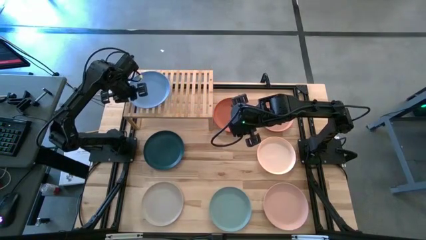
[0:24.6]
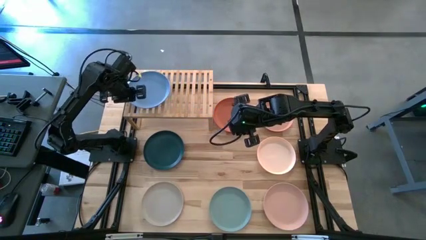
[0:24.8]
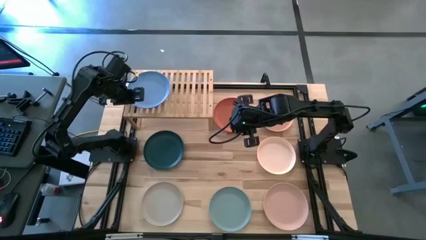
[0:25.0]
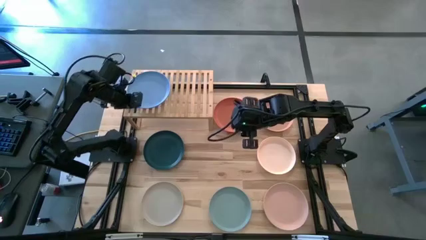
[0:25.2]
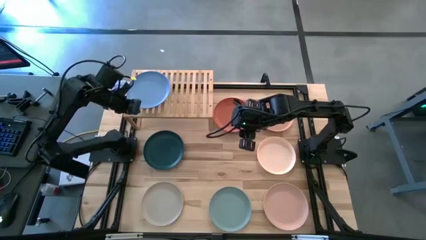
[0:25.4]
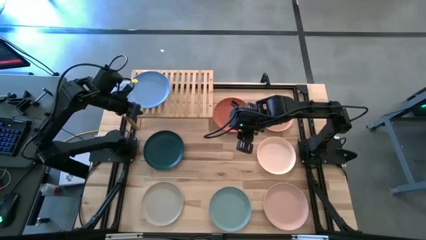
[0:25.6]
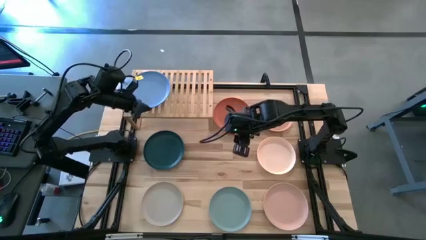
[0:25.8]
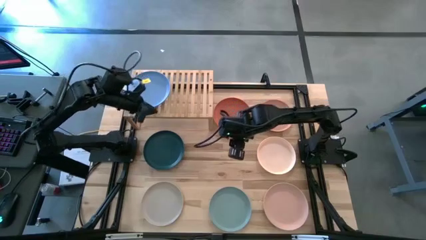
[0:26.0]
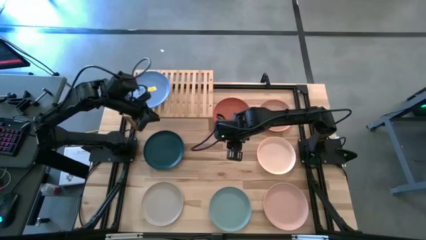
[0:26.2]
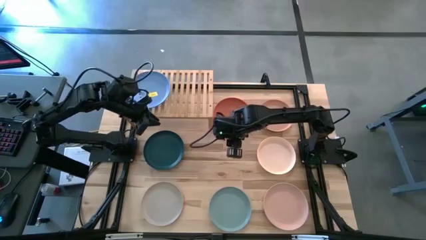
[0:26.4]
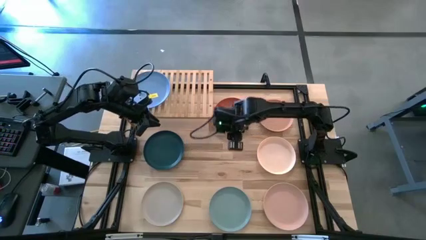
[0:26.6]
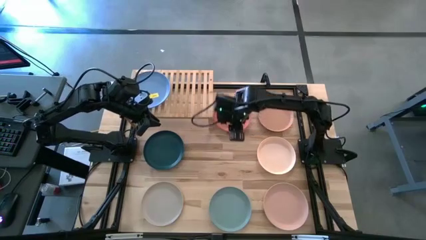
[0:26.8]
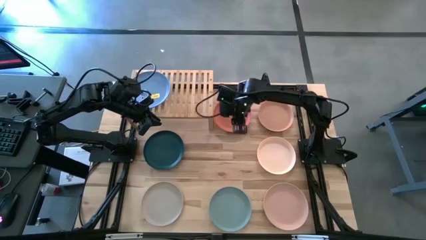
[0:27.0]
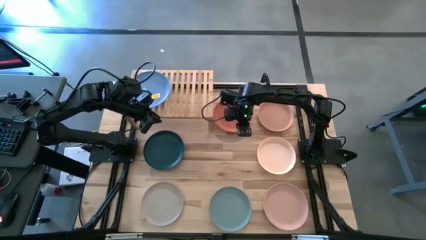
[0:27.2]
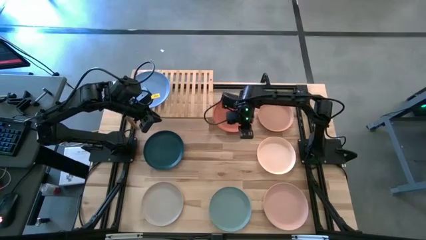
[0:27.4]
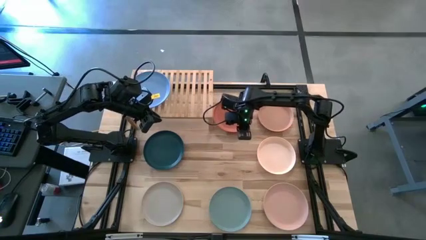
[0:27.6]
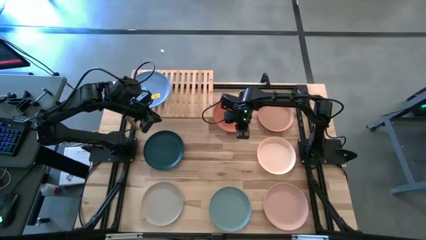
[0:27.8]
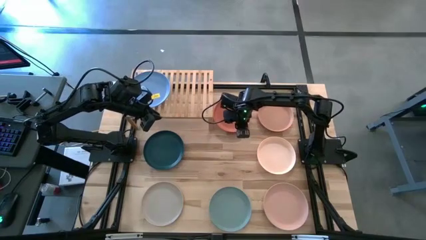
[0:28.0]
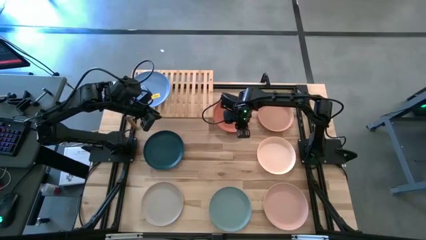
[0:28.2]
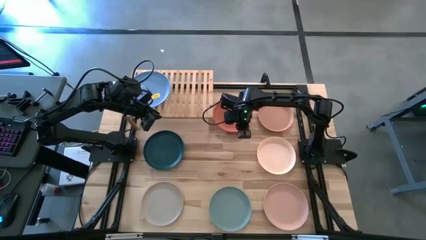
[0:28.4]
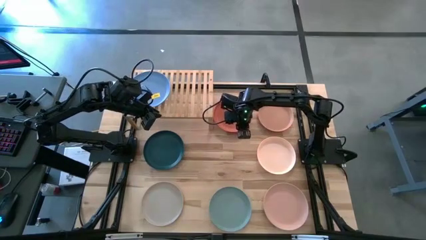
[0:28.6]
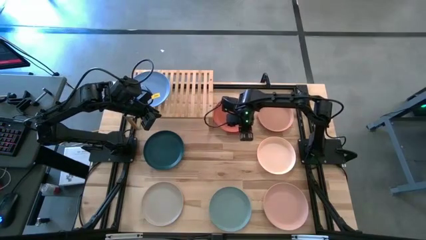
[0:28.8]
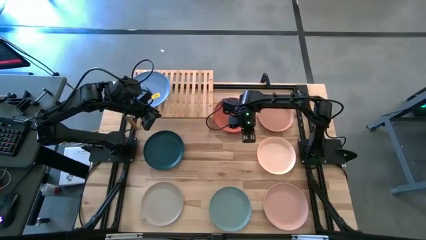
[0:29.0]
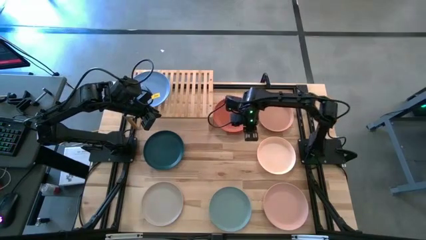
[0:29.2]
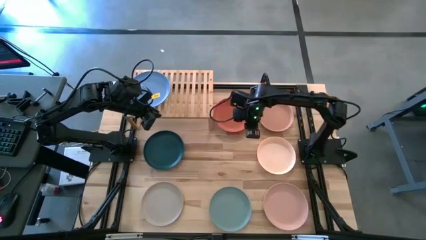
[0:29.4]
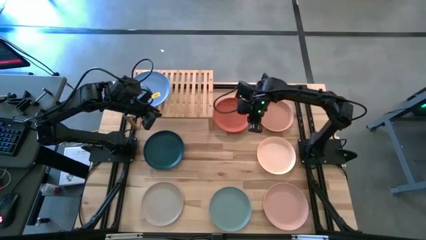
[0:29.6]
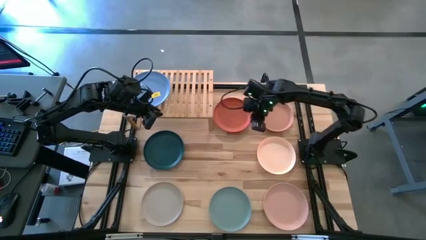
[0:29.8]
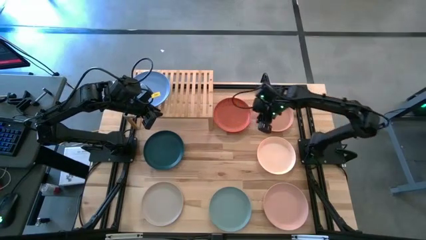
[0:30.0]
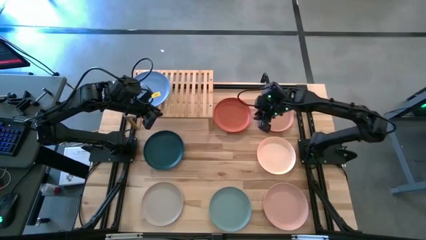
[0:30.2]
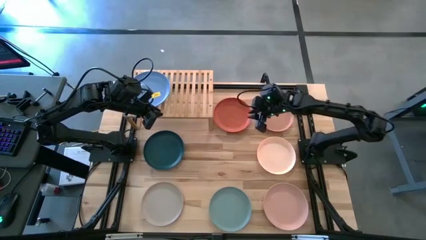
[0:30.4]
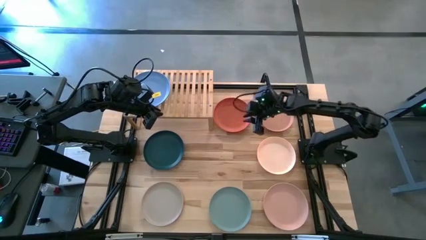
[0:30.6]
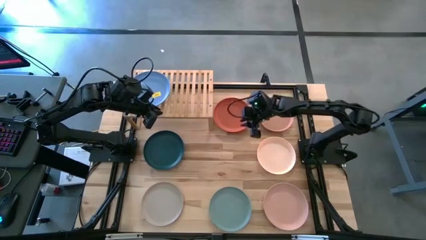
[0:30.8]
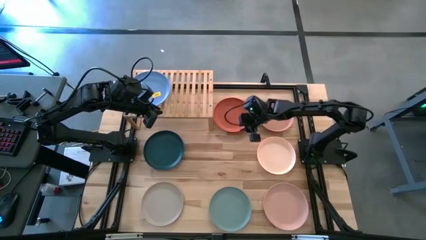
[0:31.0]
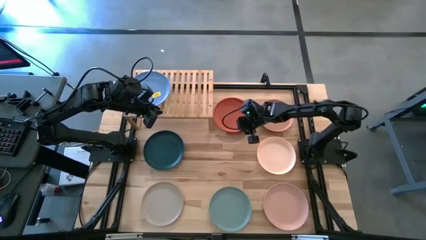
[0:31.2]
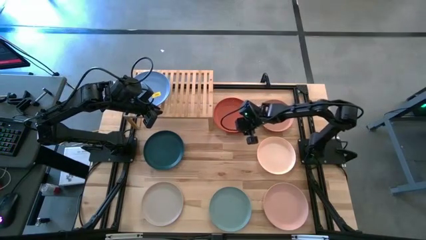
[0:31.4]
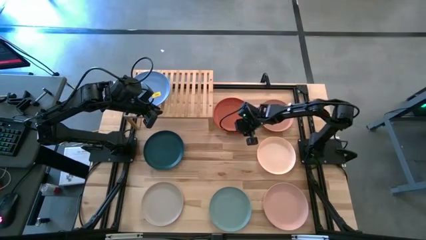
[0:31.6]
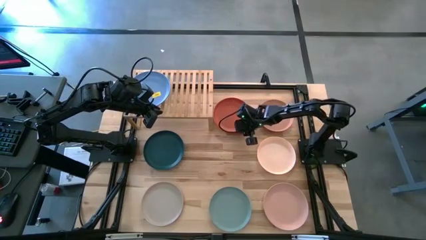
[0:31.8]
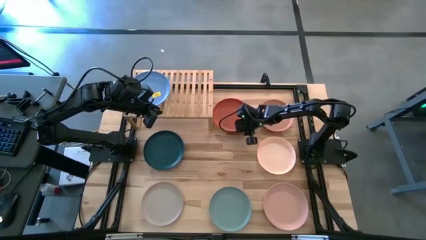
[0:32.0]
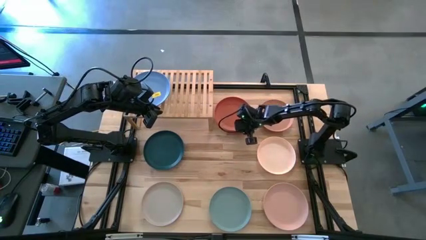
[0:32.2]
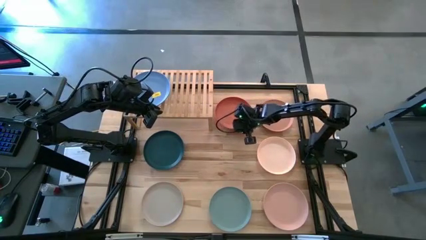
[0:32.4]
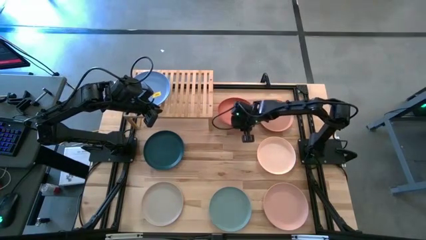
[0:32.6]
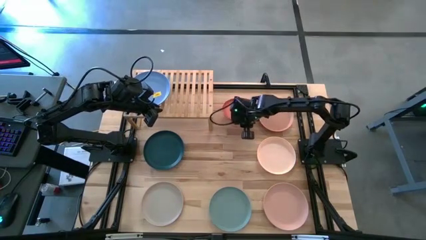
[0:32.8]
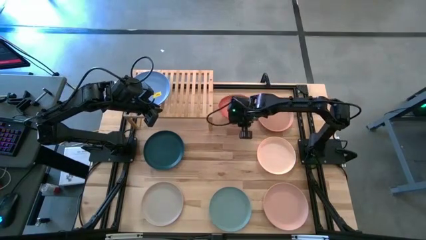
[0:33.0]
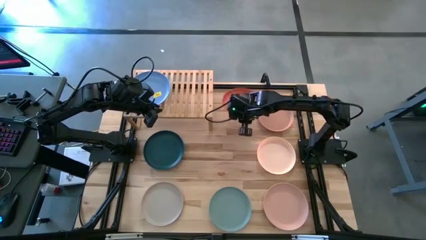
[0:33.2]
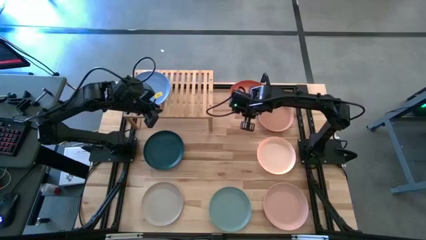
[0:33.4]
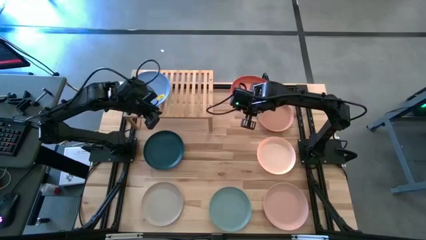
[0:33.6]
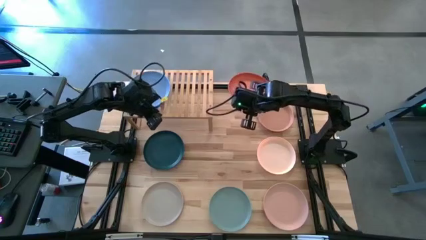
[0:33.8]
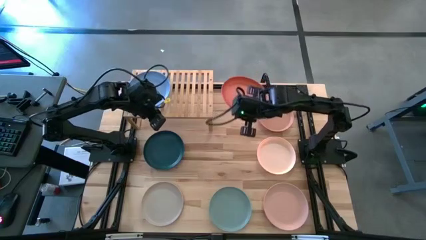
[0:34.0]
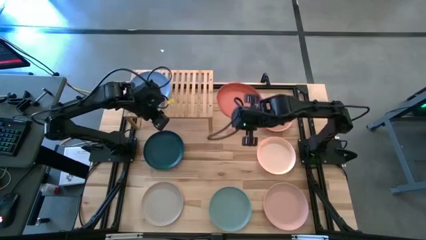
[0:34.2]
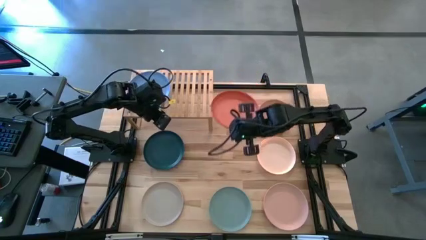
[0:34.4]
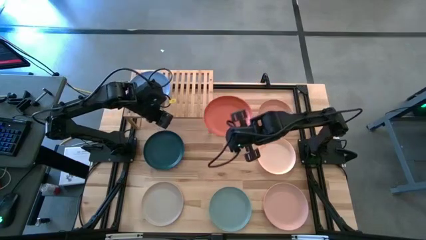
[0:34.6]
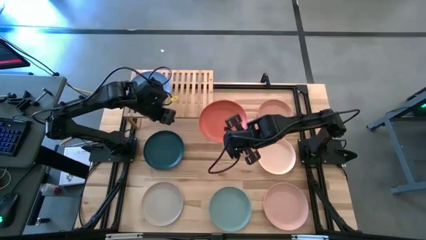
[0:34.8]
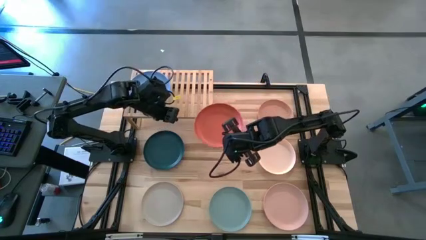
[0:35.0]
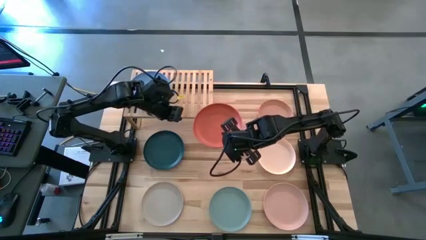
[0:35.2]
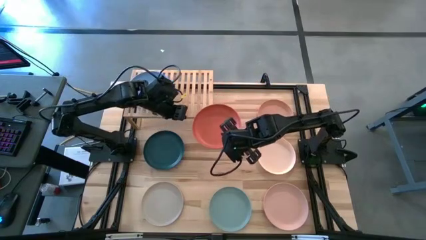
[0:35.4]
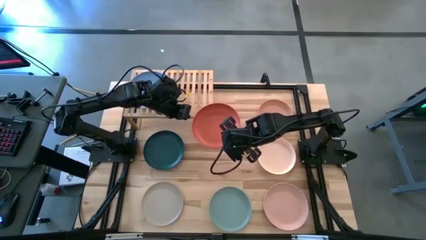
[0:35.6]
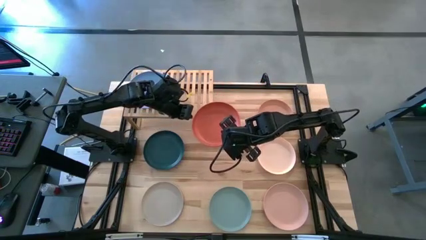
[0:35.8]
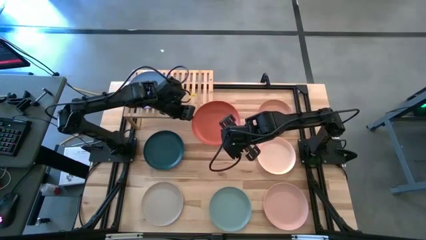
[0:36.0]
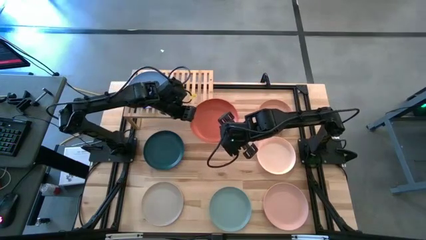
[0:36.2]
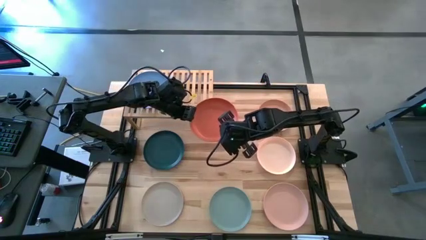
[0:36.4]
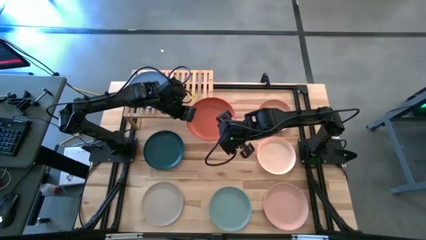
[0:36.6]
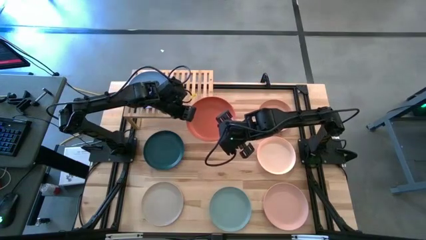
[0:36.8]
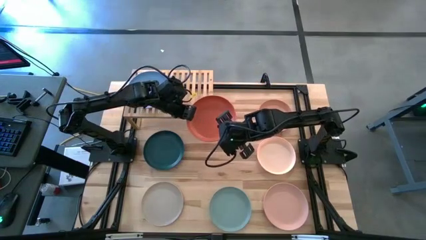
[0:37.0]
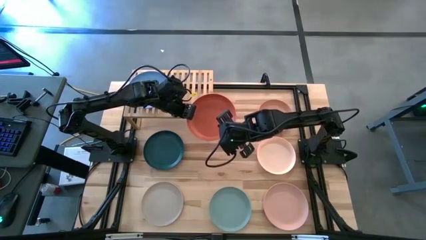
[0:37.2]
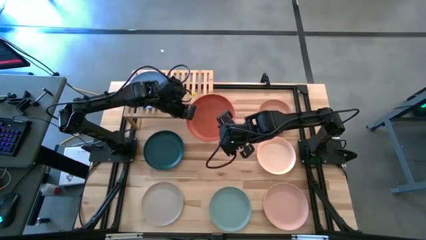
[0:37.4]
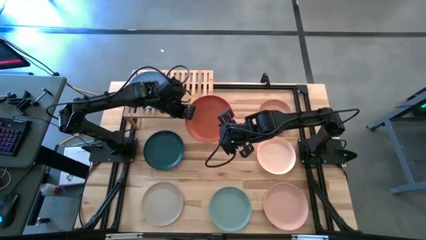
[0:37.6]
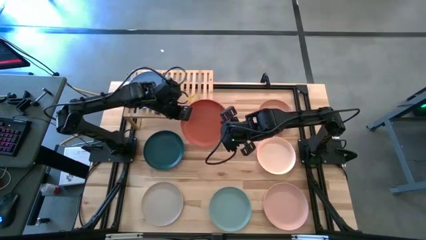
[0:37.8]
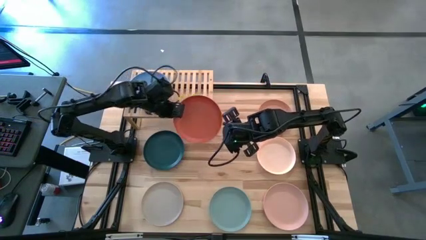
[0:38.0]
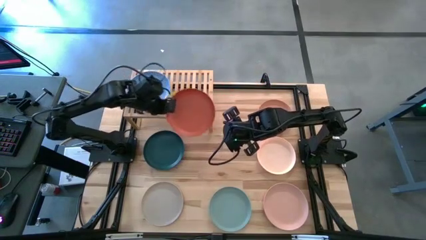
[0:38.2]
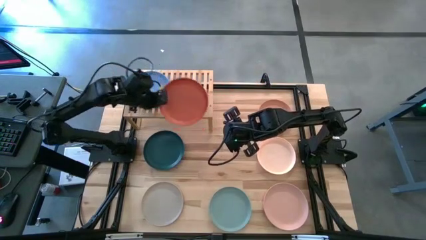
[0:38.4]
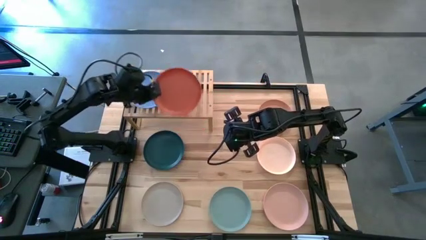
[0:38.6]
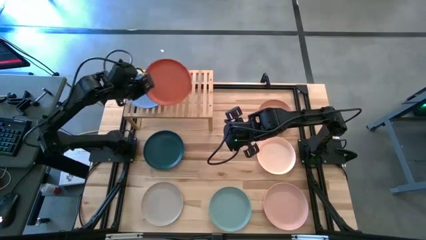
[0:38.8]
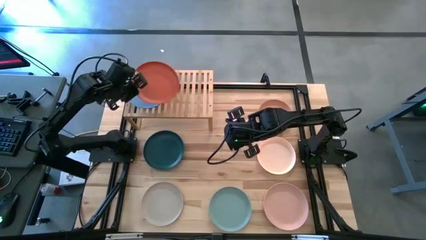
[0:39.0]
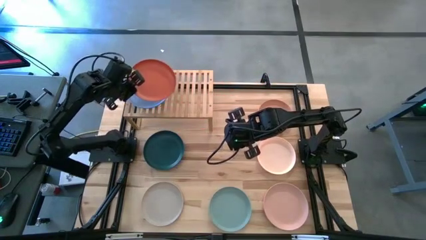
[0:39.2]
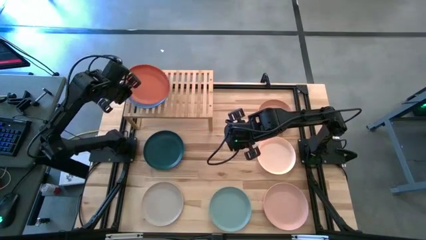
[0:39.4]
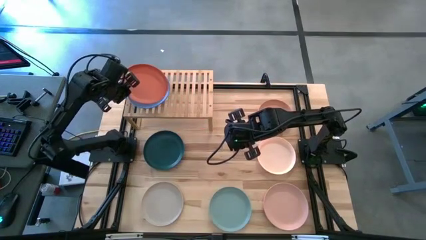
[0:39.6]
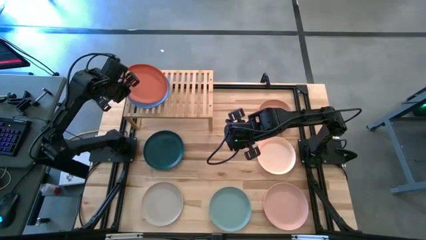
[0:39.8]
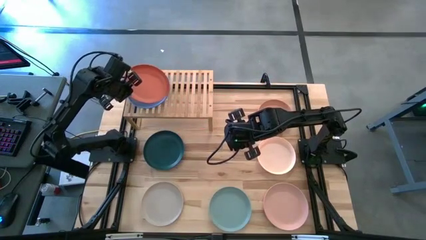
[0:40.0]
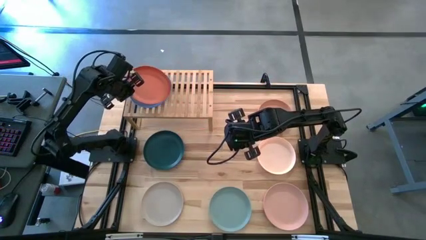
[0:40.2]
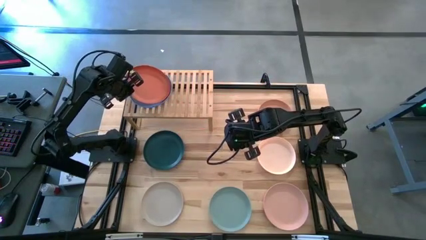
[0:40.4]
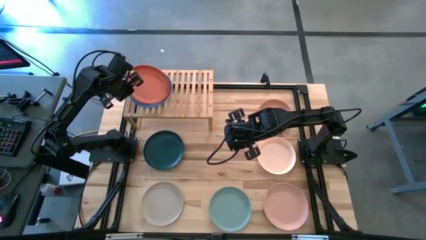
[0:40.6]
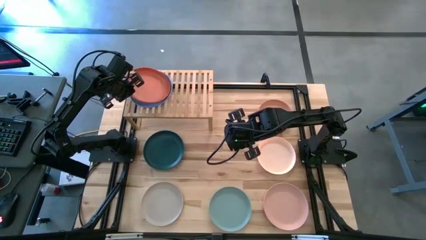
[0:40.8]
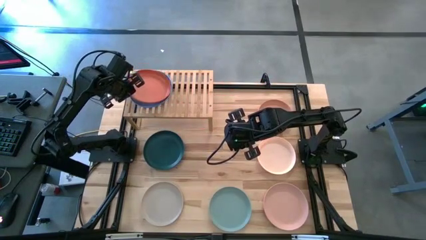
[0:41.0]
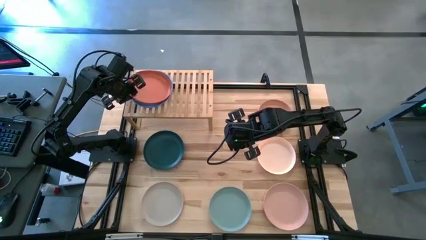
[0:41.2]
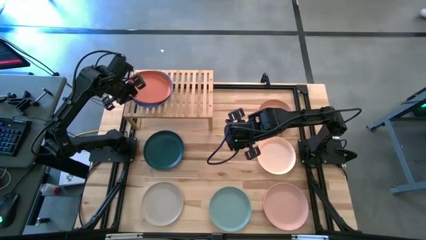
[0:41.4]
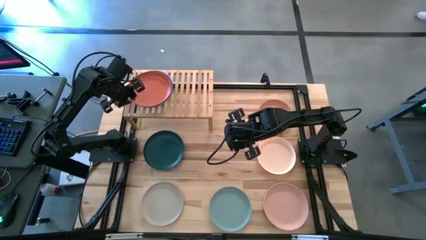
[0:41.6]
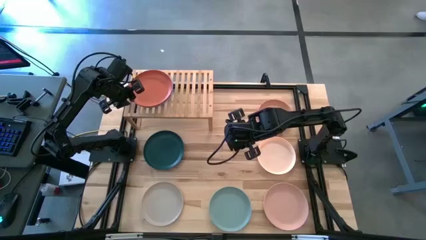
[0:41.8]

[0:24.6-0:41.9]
Task: Place and stack plates onto a shelf
Stack the orange plate on the top of the light blue plate
